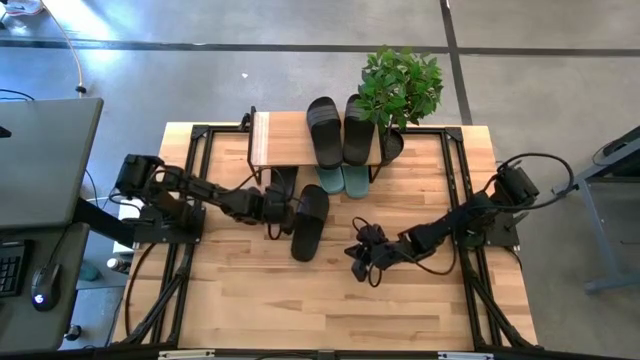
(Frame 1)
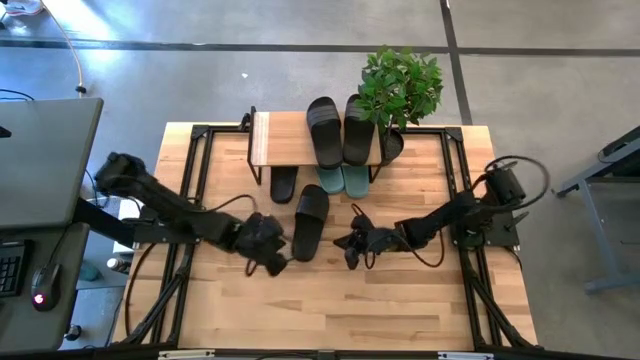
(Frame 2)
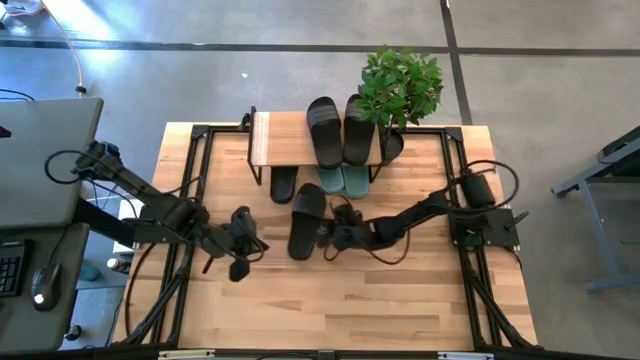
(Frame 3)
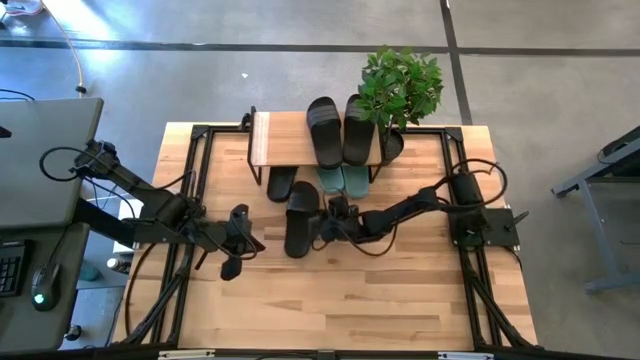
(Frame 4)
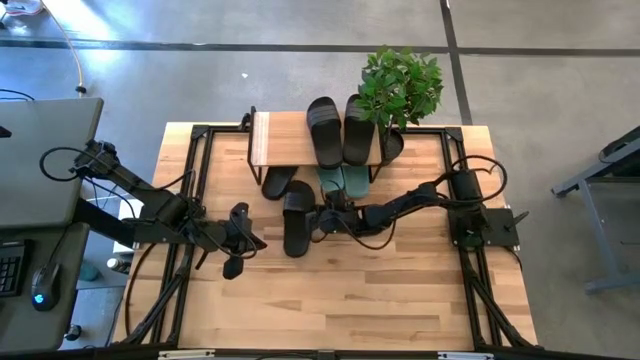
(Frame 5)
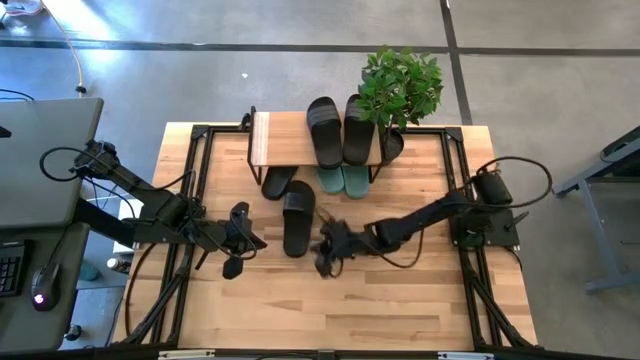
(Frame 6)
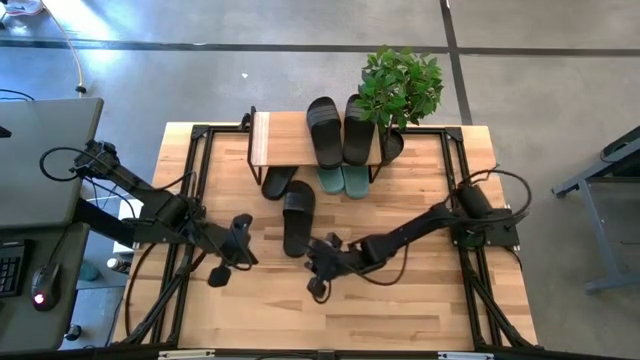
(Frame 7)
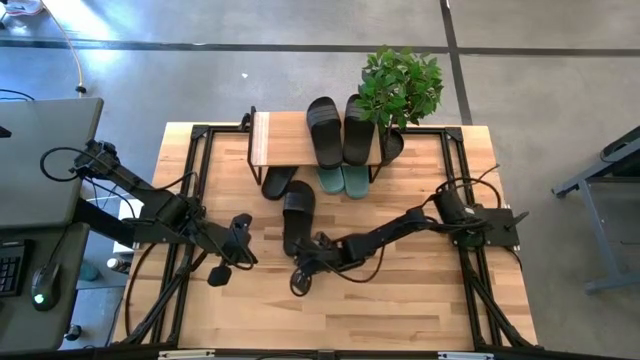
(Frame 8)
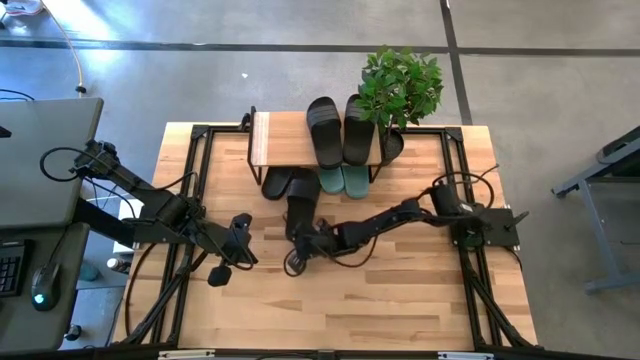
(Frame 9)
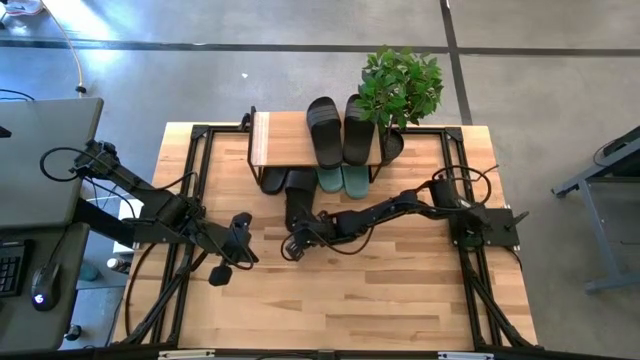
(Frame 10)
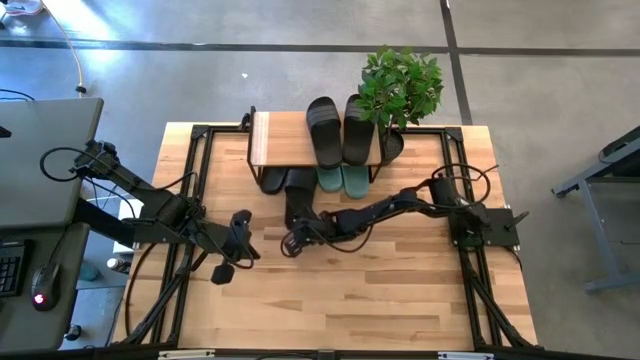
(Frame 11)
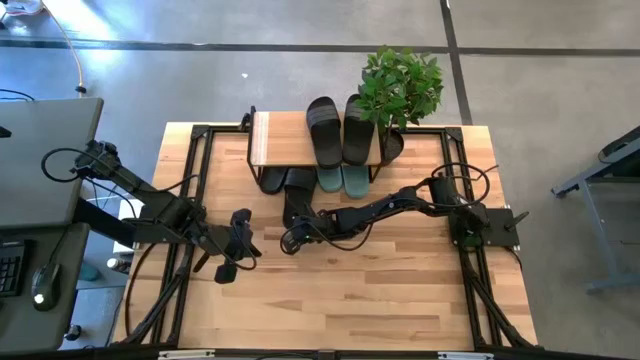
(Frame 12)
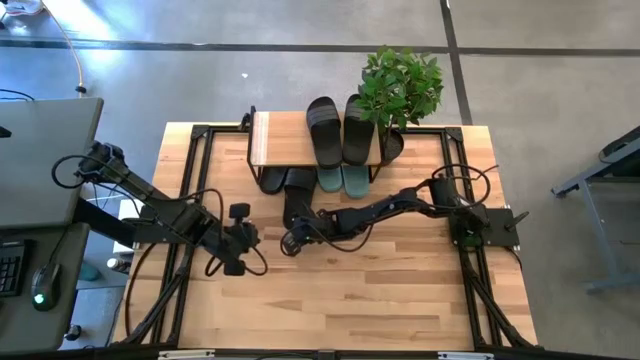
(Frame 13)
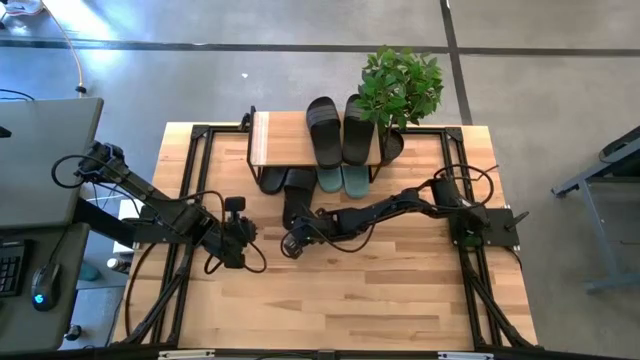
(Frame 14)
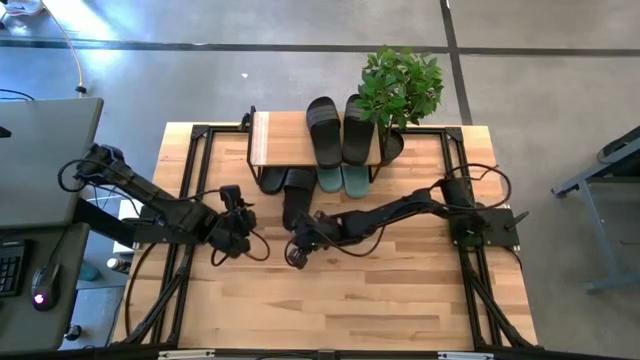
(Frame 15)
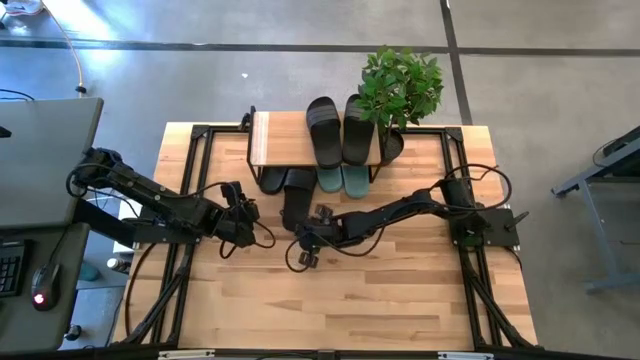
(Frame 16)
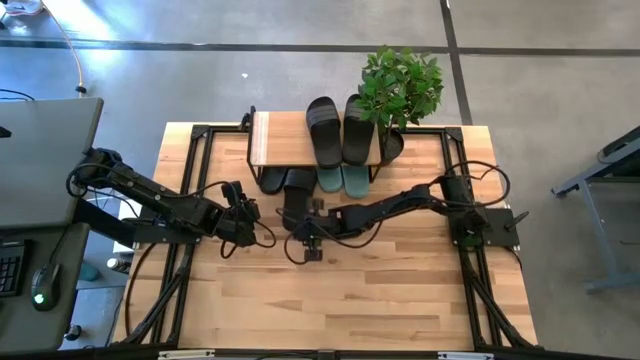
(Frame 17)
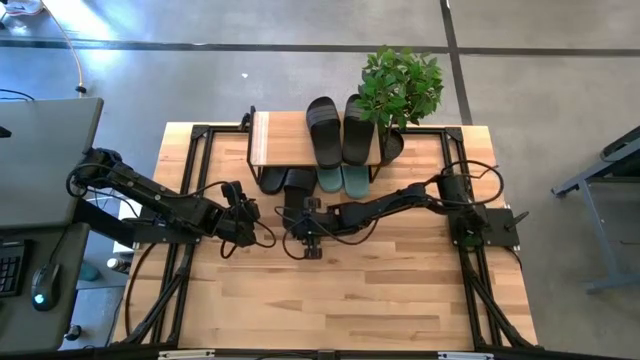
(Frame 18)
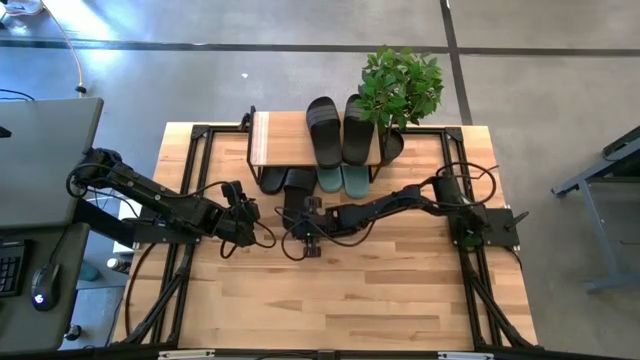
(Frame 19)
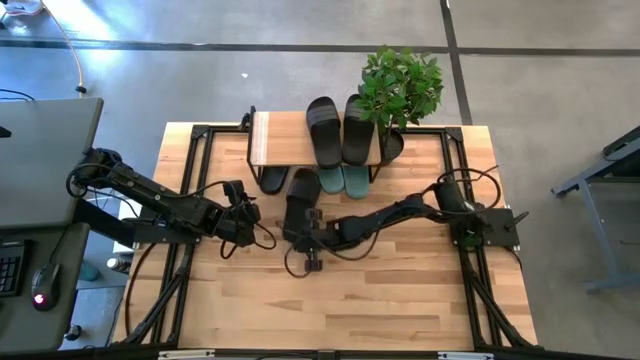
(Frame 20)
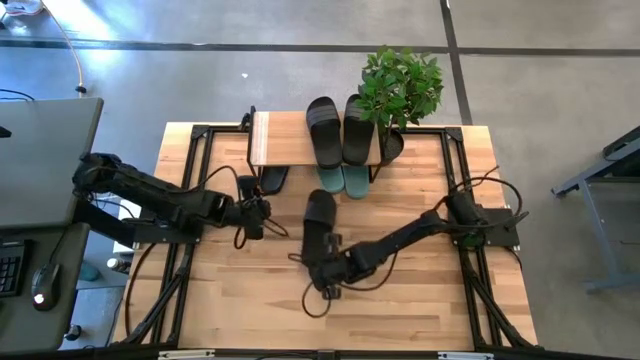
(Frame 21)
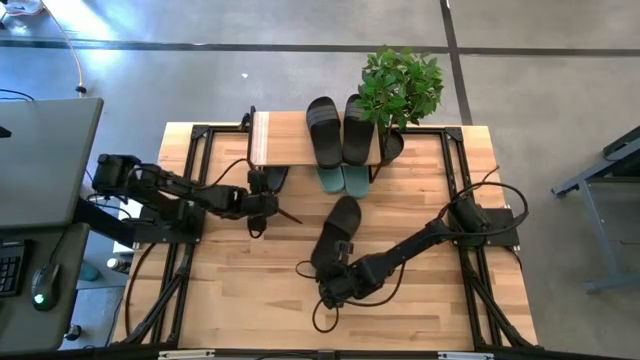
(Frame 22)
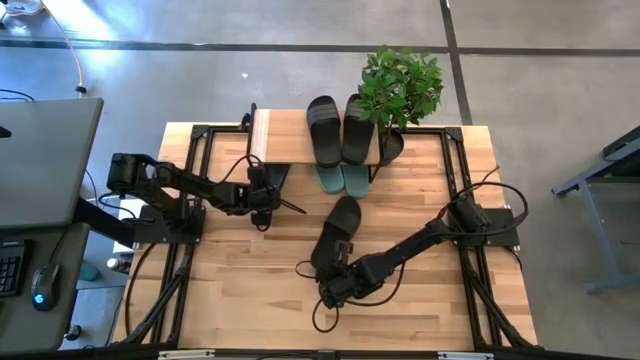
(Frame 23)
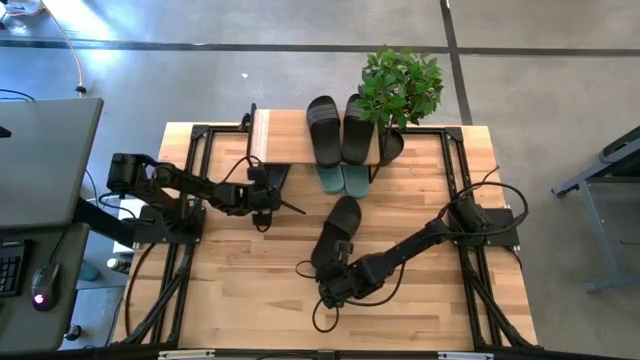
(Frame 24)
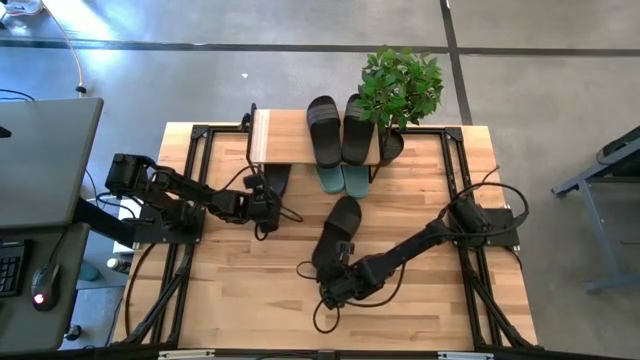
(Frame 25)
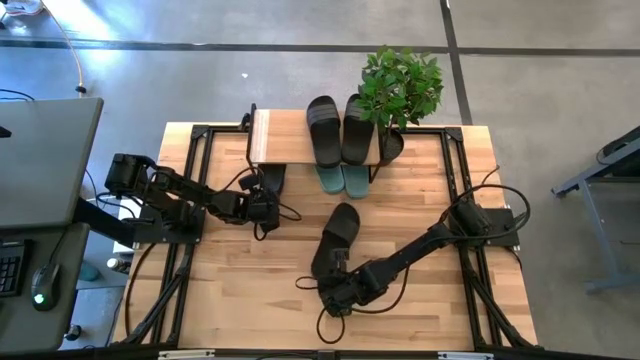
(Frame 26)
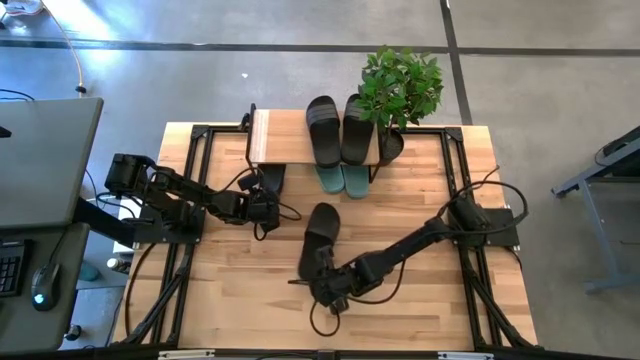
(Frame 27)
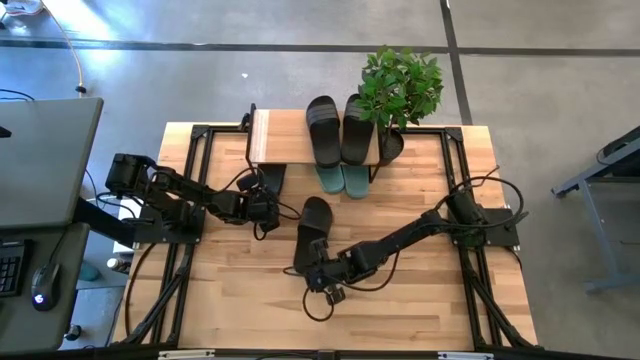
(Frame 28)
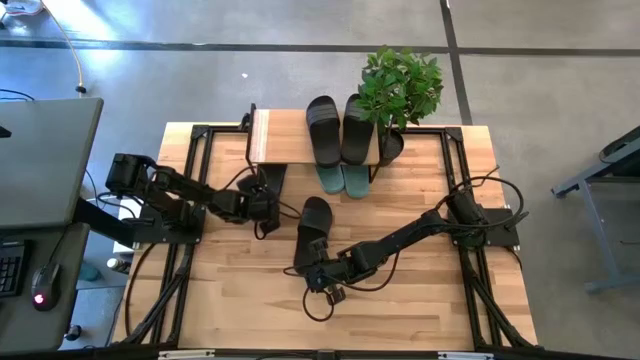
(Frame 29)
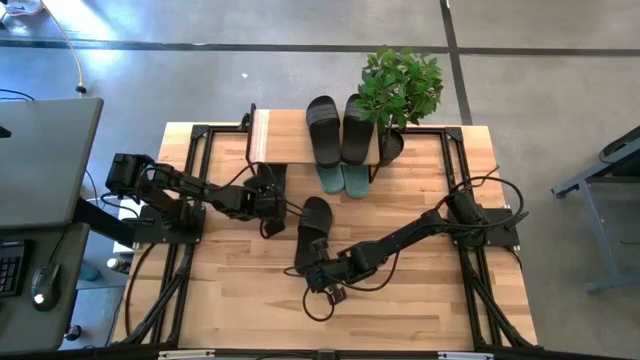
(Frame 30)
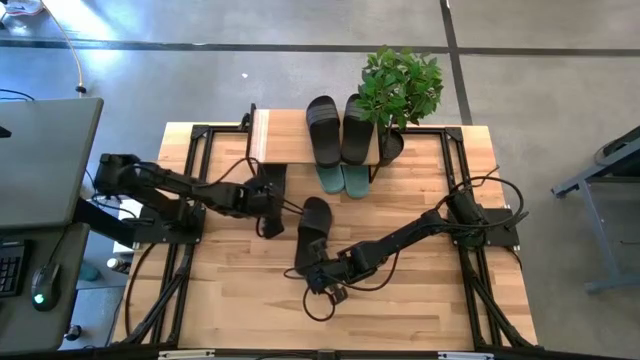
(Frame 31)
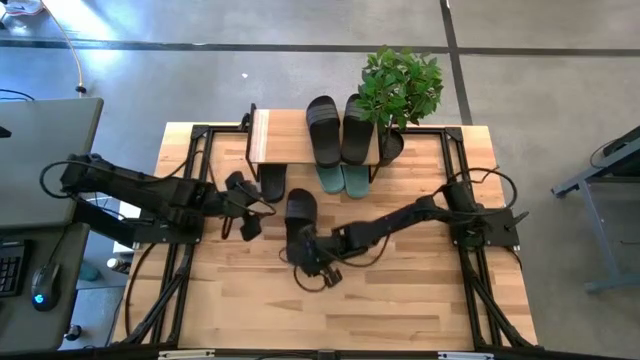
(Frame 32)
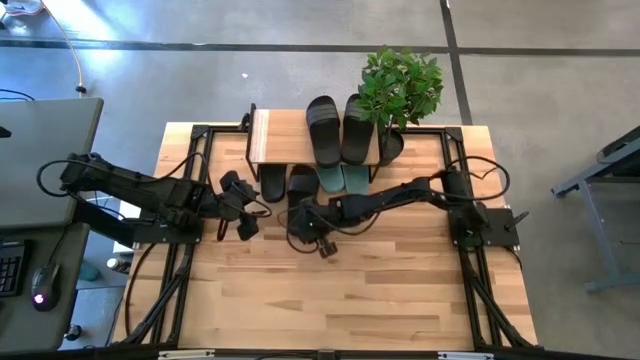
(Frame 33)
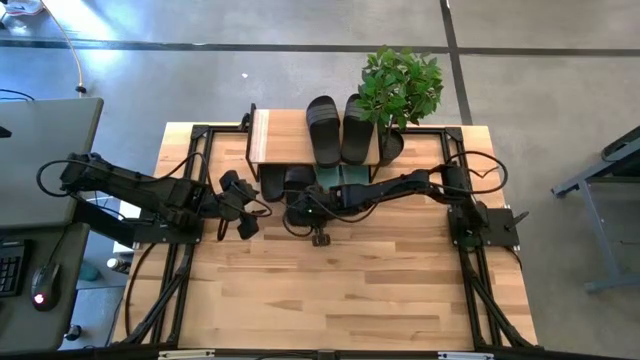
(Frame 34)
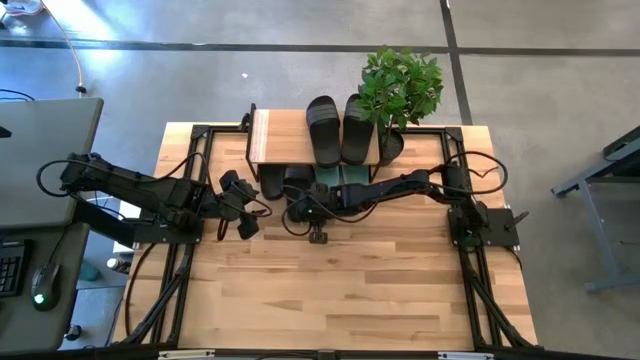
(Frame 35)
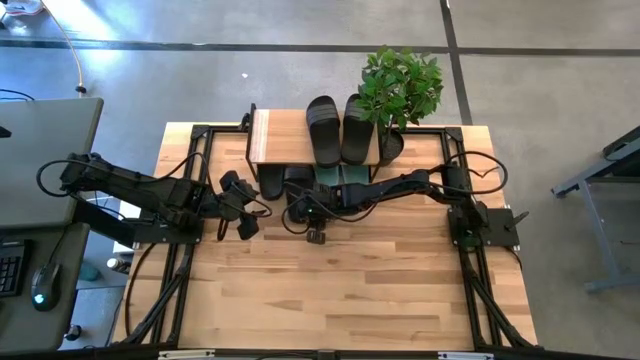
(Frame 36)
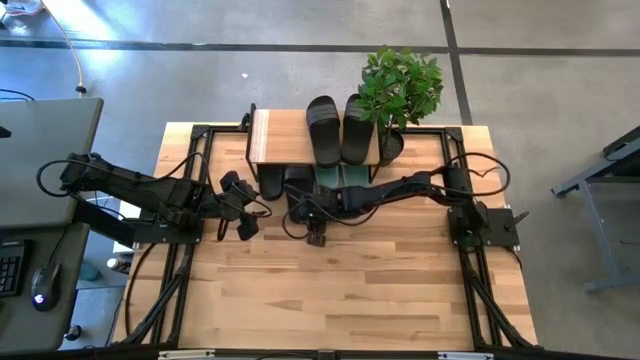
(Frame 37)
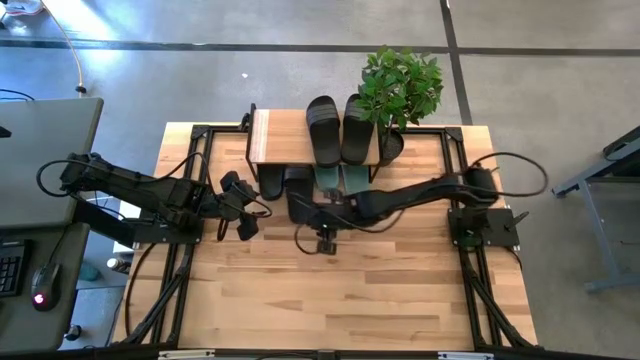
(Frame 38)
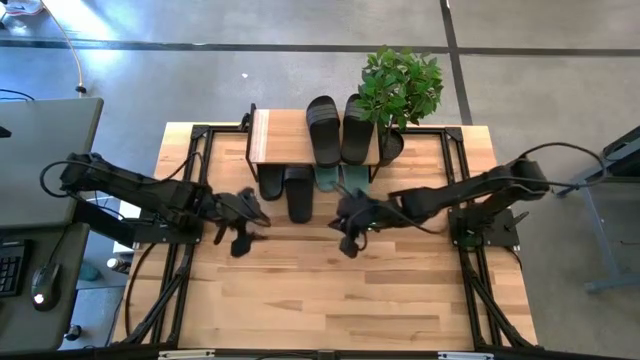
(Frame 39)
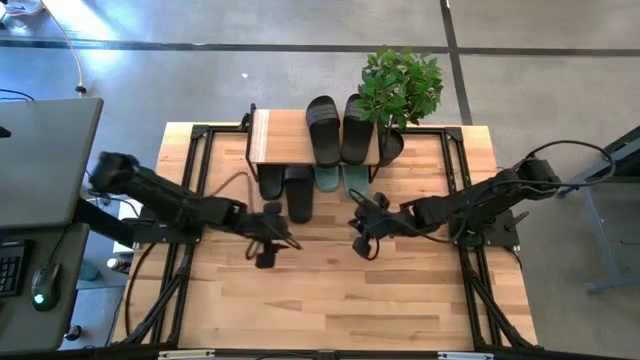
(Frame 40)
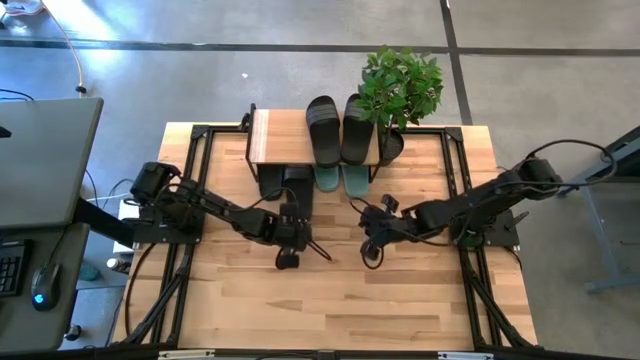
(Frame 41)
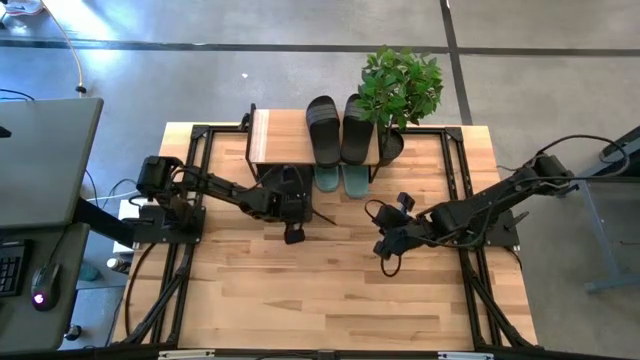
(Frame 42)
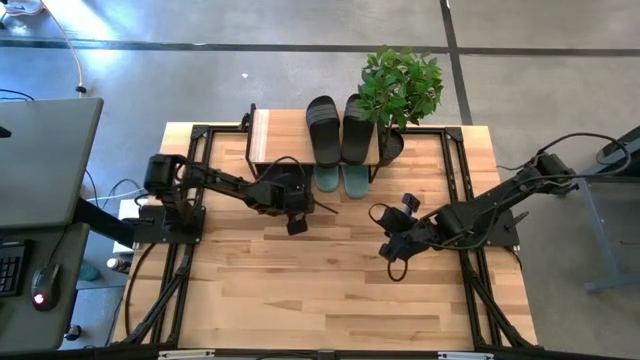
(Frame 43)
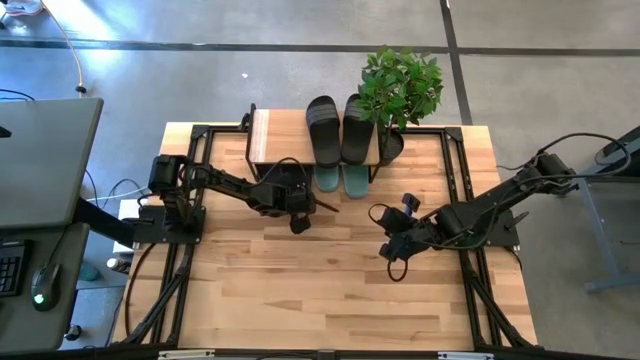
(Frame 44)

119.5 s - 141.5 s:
Task: Pick and place slides into the shelf
Put the black slipper under the shelf

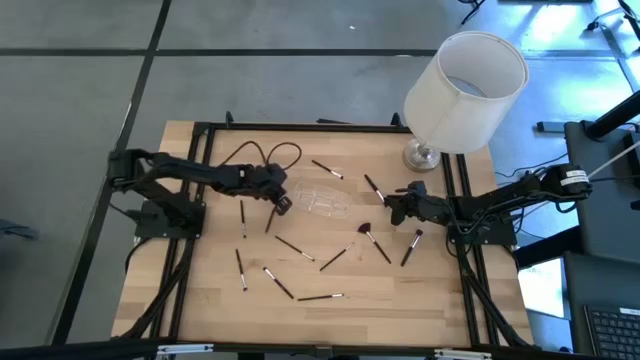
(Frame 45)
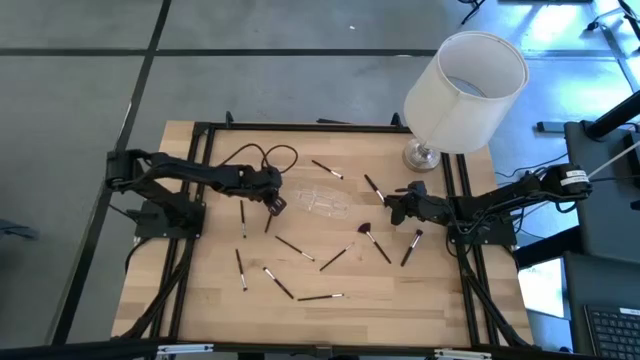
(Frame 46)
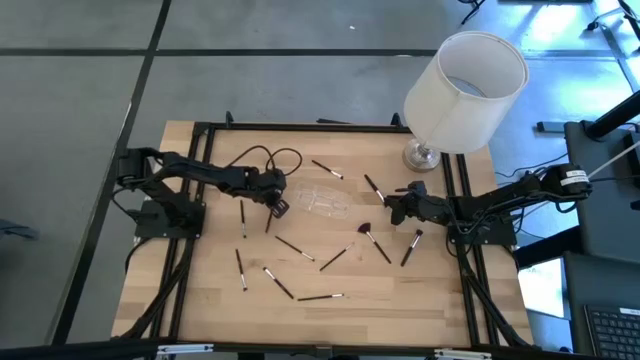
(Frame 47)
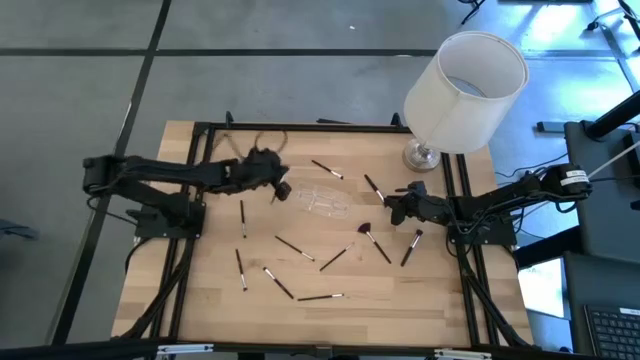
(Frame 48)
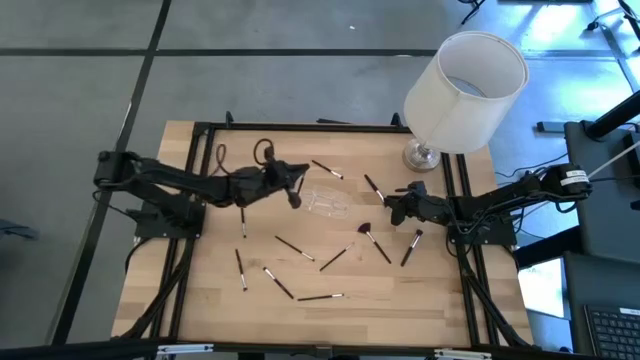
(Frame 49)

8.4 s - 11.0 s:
Task: Put items in baskets/containers
Put the eyeshadow brush into the transparent organizer
